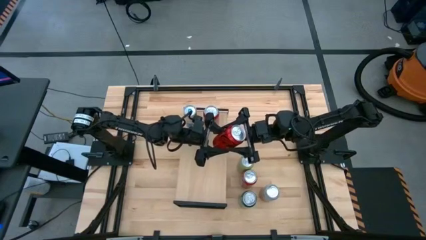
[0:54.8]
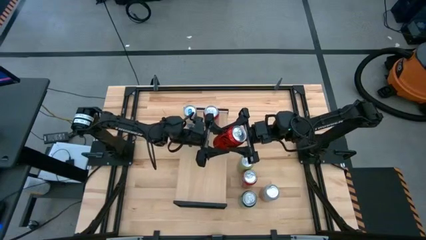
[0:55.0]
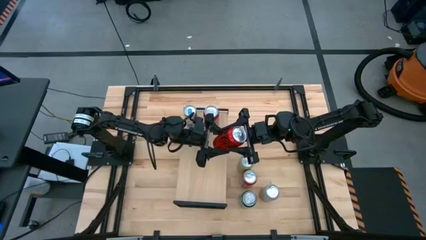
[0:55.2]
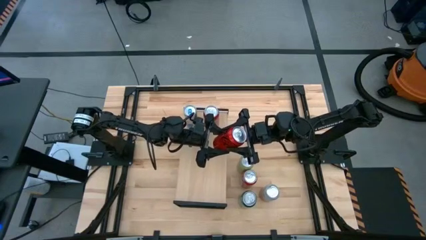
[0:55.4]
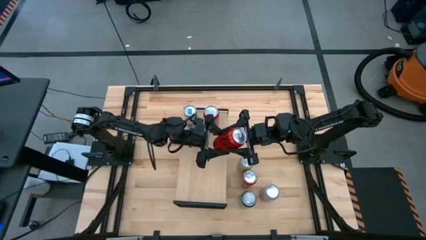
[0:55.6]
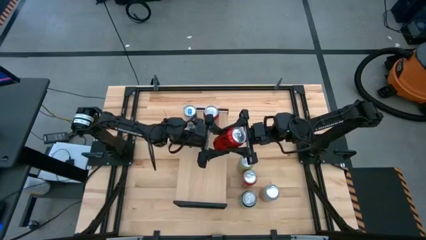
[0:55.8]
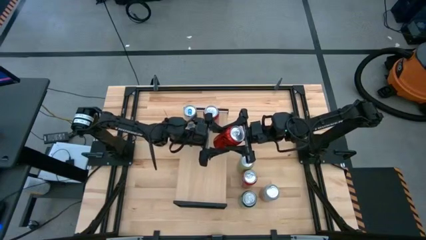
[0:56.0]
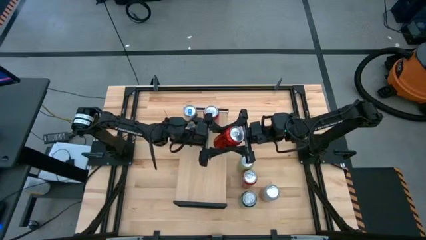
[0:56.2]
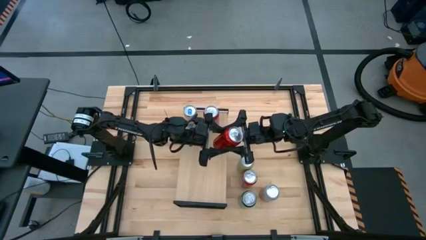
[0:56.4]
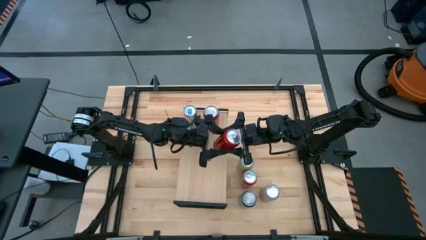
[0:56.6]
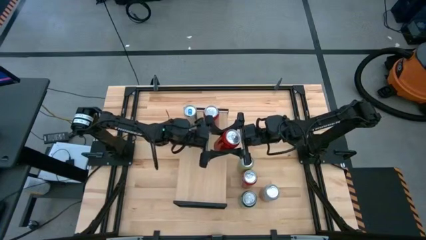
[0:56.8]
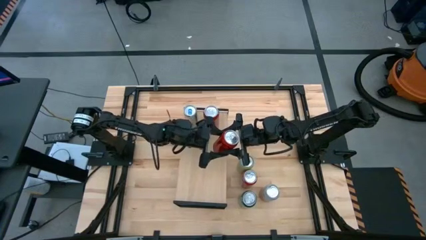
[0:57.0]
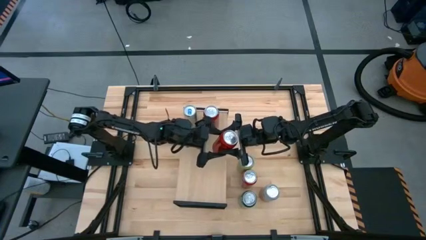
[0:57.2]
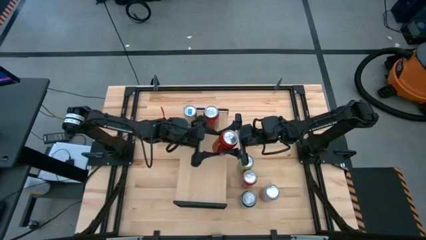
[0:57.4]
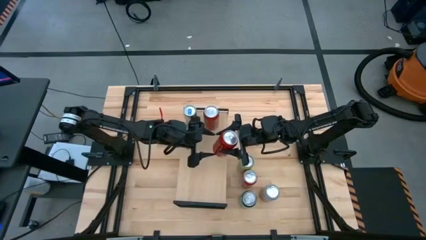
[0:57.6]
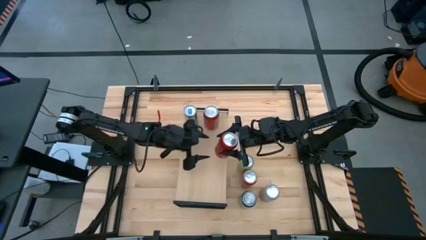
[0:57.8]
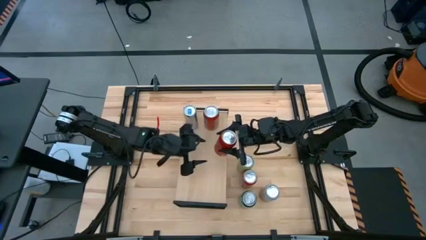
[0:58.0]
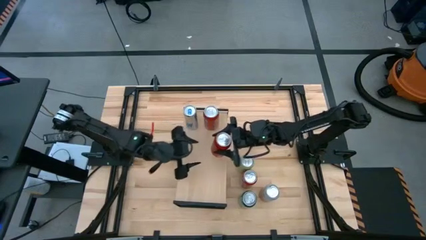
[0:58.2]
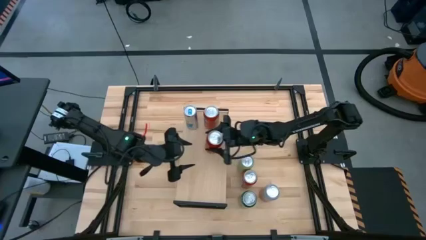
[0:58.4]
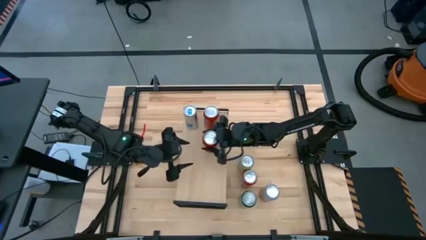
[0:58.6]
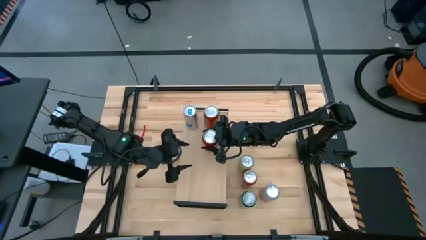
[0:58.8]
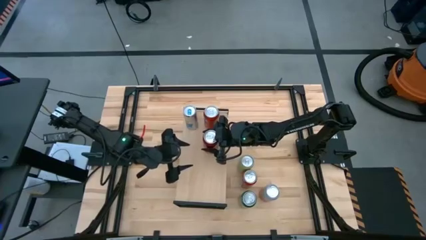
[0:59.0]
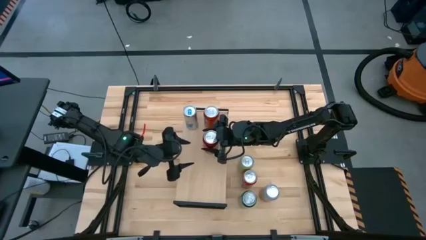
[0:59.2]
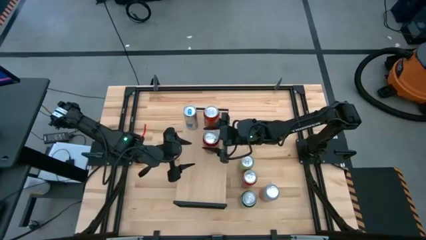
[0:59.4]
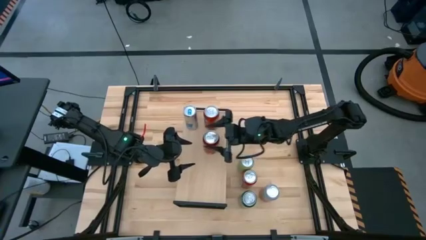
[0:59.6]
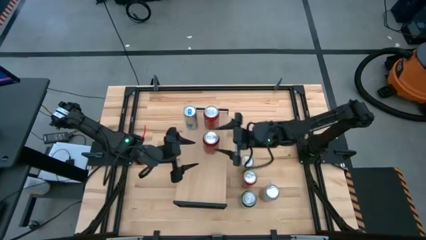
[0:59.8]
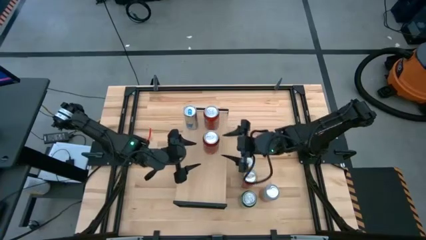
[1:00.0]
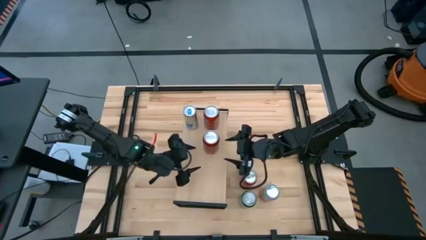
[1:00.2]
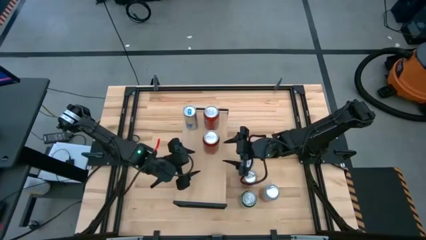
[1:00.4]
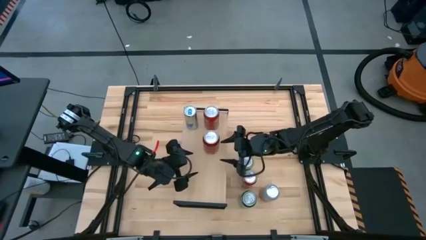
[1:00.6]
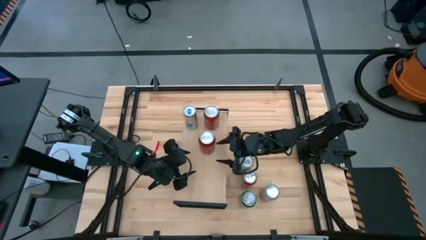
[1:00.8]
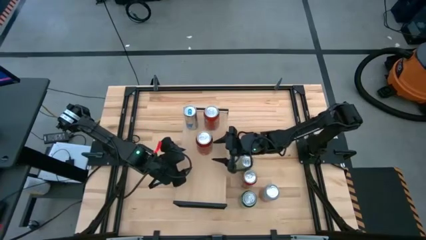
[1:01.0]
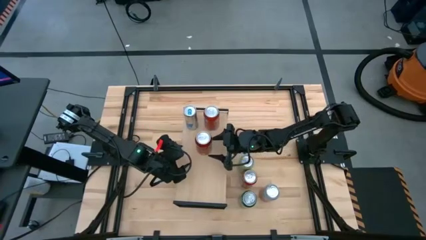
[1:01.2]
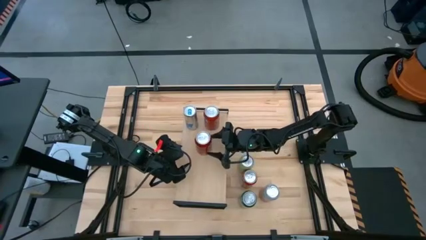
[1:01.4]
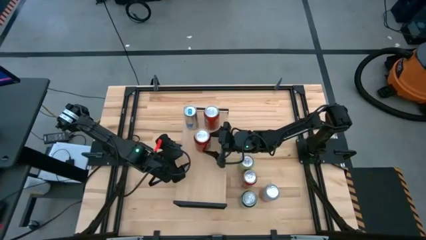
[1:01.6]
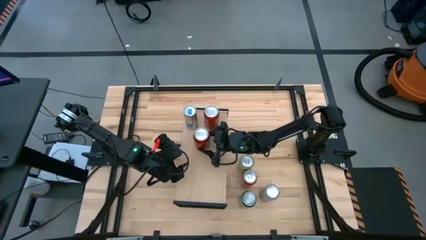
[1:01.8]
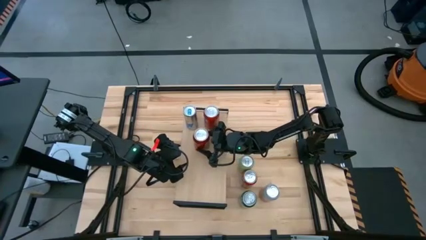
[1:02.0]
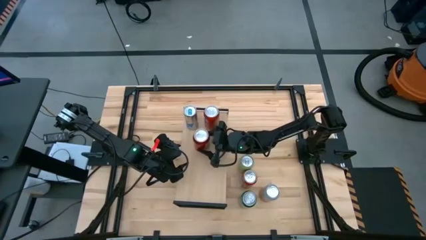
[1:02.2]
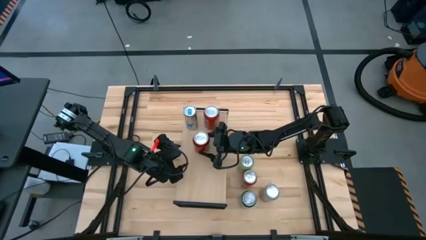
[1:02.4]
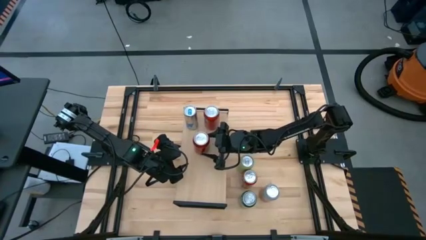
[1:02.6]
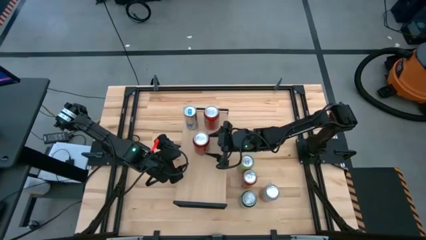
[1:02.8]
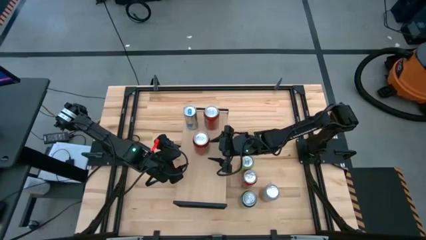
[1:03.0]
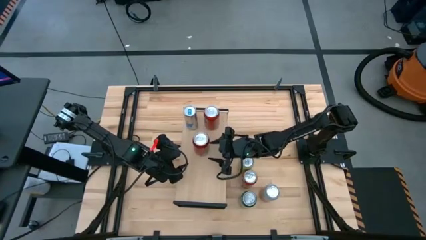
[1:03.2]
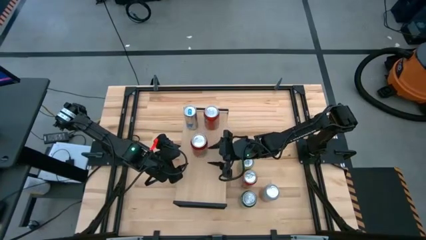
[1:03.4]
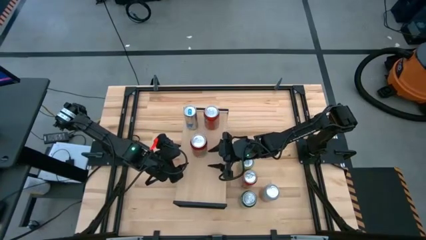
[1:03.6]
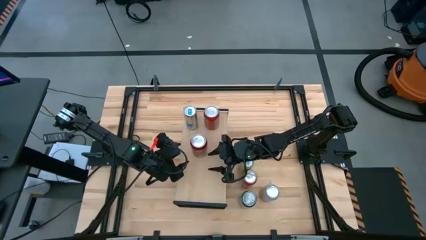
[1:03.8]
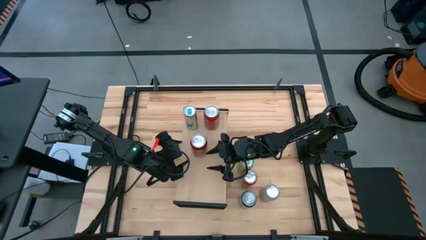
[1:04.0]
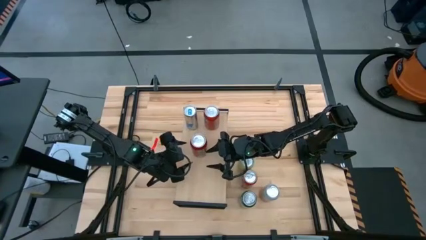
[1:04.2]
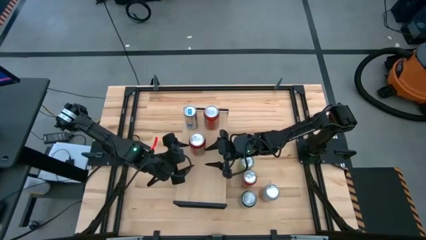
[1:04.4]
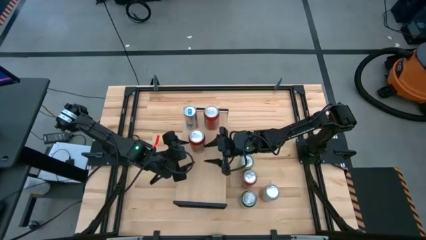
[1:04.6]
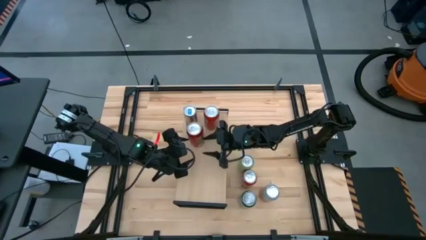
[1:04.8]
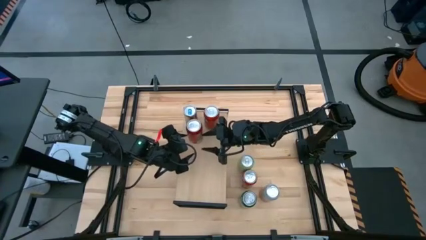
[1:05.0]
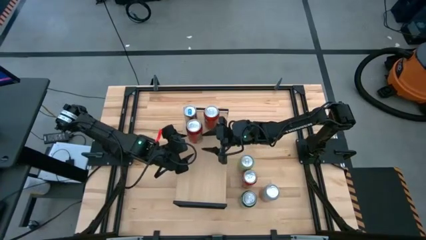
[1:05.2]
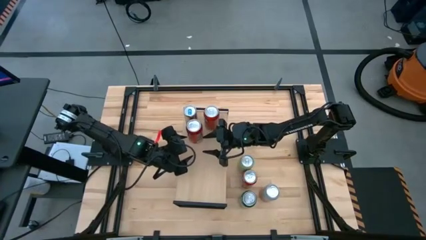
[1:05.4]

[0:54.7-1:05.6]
Task: Place canned beverage on shelf
Put the red black soda can on the shelf
